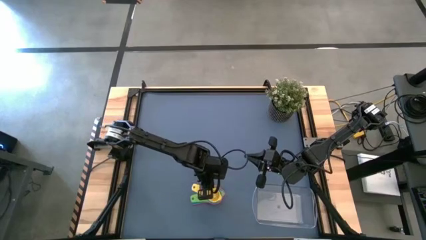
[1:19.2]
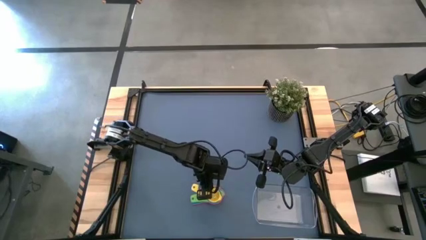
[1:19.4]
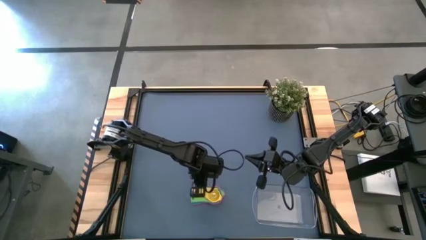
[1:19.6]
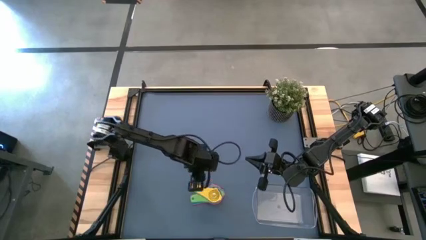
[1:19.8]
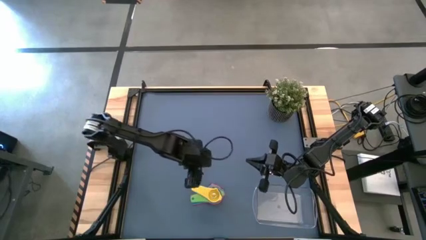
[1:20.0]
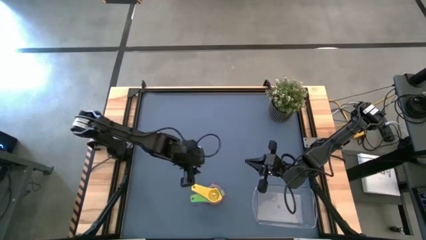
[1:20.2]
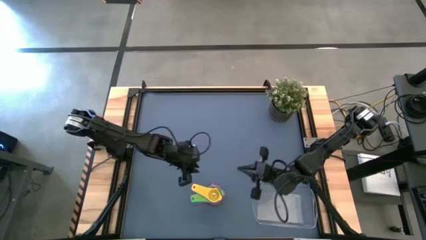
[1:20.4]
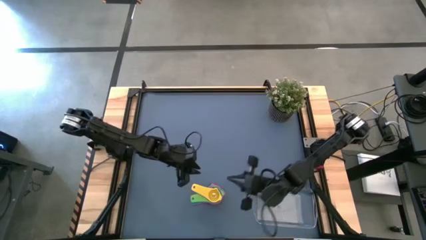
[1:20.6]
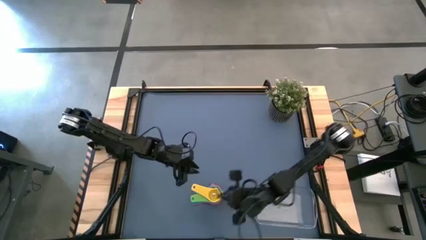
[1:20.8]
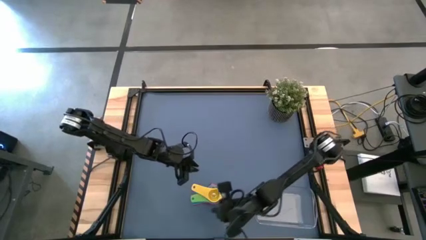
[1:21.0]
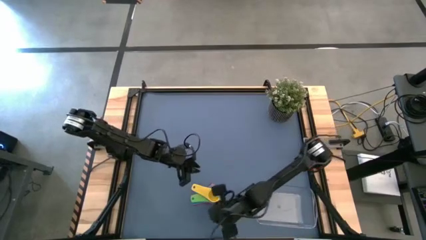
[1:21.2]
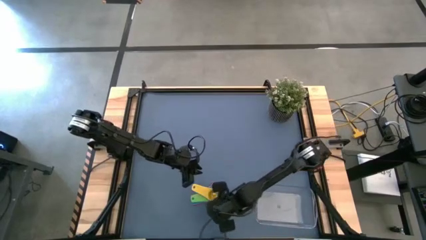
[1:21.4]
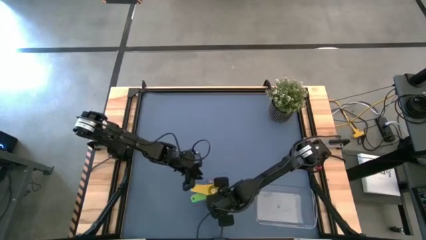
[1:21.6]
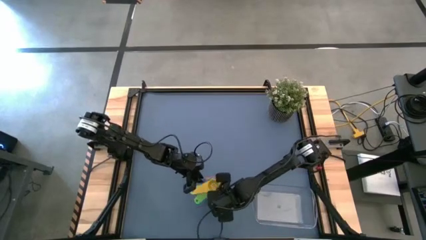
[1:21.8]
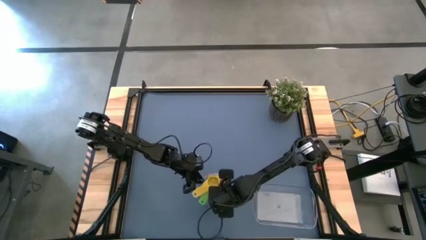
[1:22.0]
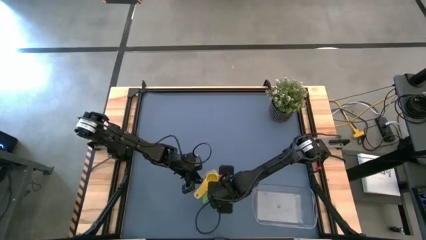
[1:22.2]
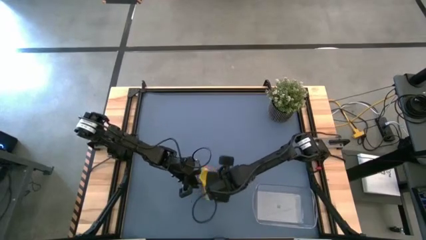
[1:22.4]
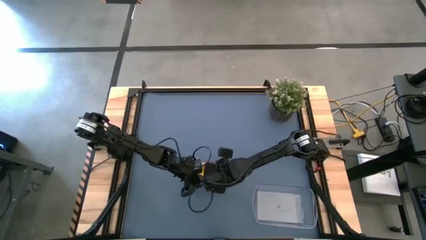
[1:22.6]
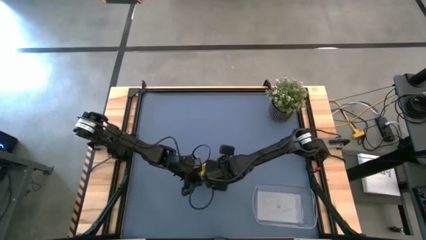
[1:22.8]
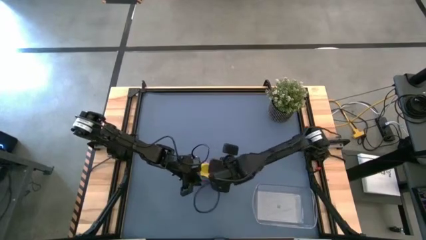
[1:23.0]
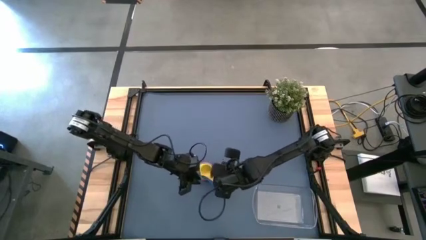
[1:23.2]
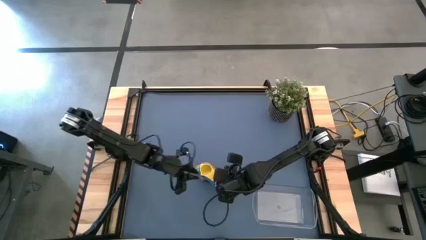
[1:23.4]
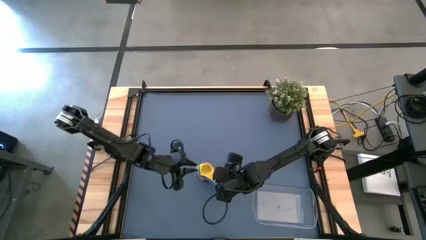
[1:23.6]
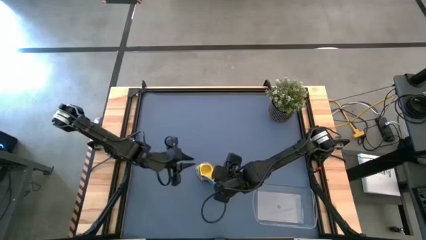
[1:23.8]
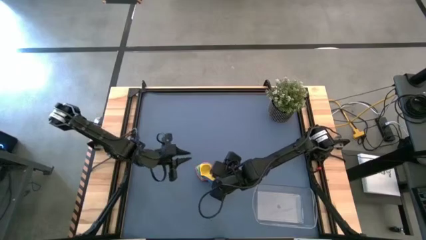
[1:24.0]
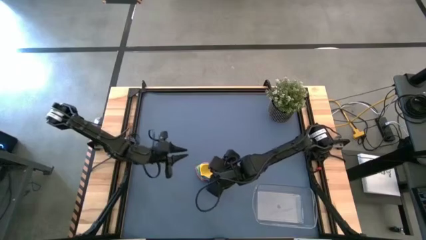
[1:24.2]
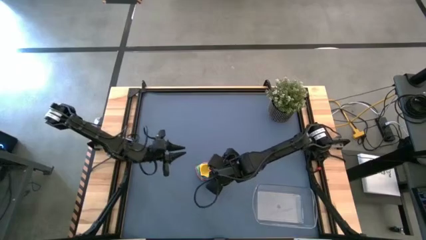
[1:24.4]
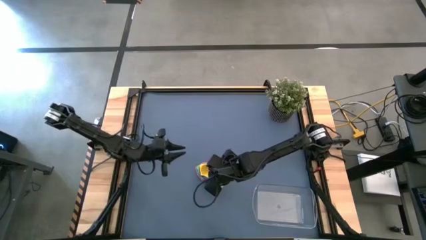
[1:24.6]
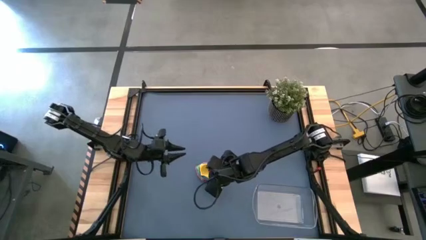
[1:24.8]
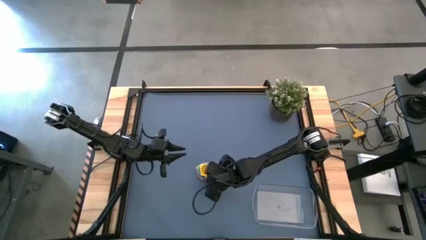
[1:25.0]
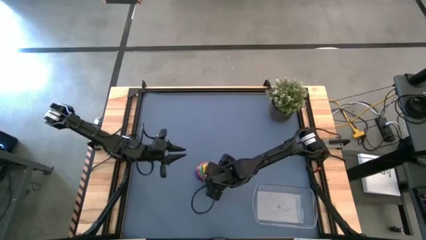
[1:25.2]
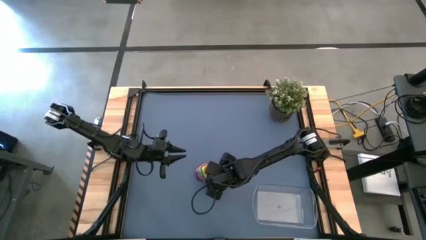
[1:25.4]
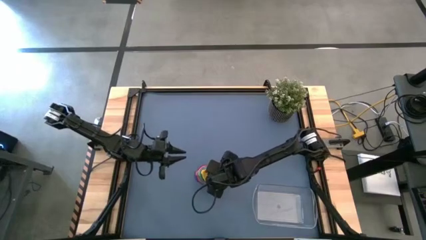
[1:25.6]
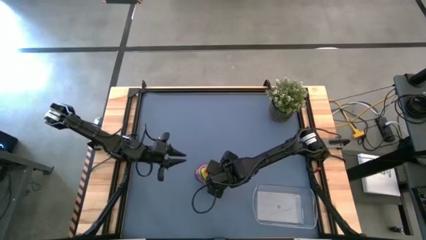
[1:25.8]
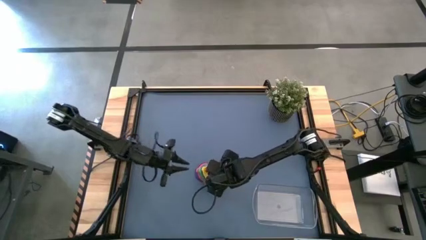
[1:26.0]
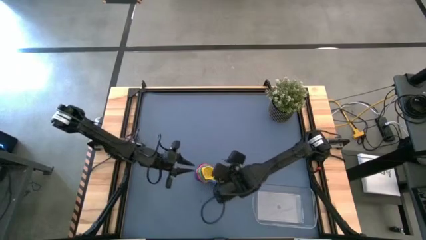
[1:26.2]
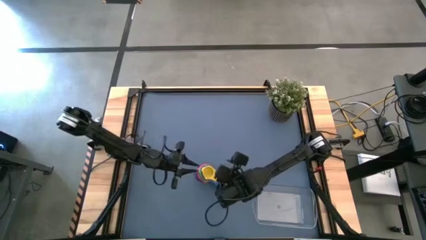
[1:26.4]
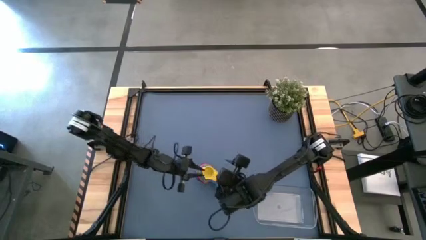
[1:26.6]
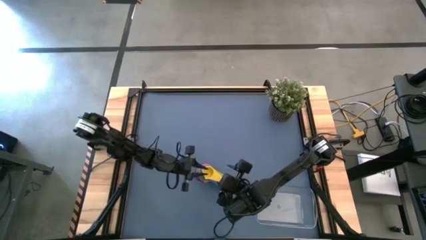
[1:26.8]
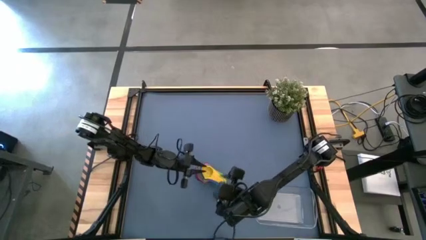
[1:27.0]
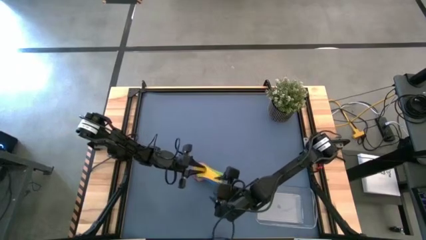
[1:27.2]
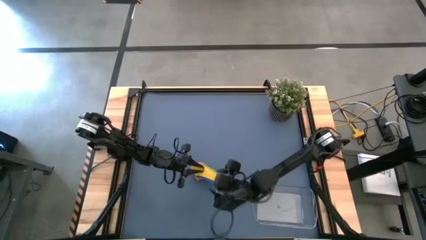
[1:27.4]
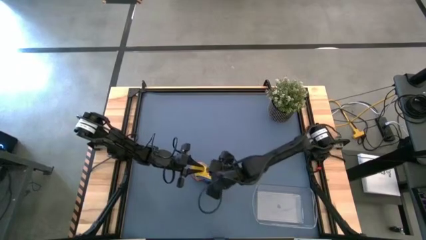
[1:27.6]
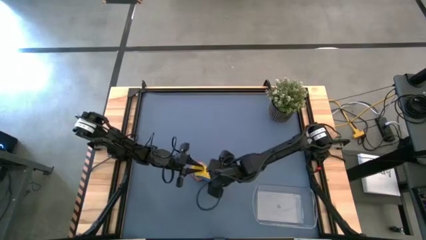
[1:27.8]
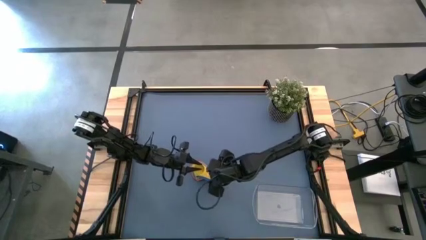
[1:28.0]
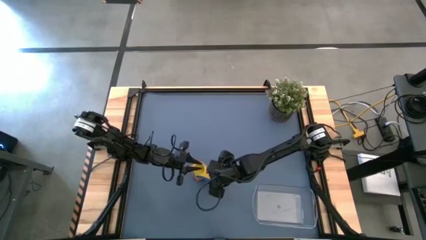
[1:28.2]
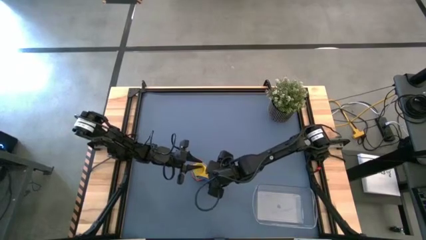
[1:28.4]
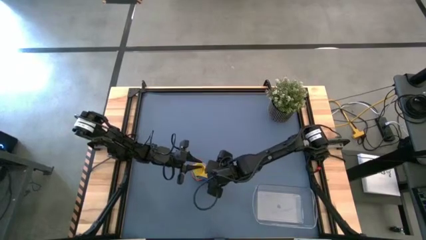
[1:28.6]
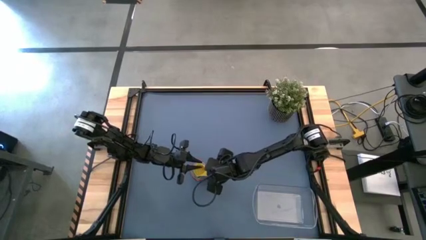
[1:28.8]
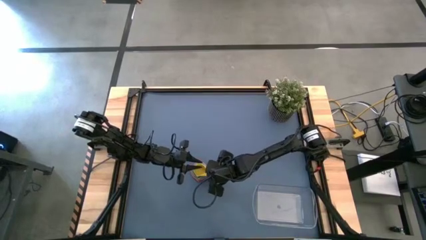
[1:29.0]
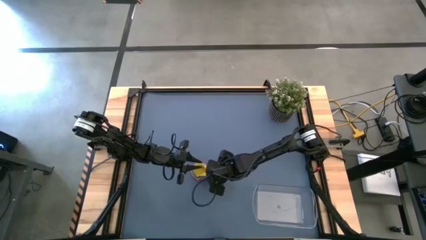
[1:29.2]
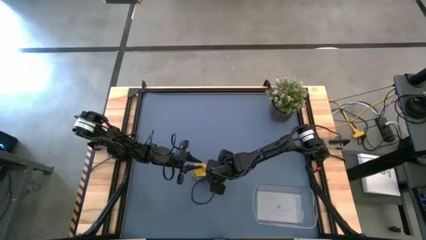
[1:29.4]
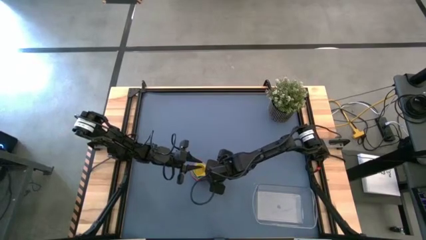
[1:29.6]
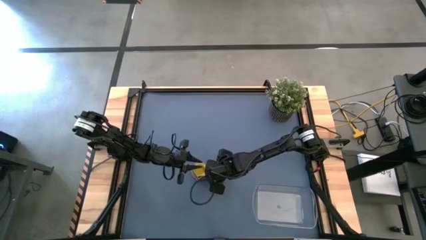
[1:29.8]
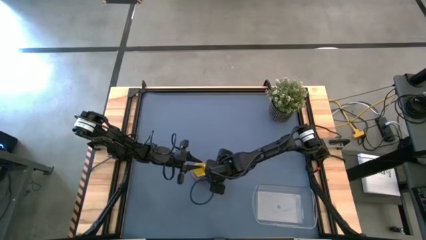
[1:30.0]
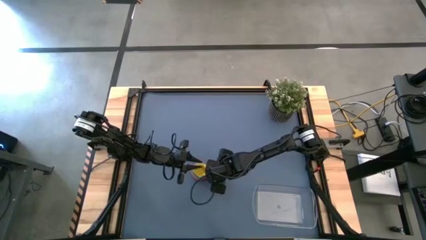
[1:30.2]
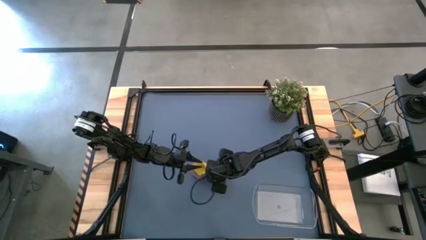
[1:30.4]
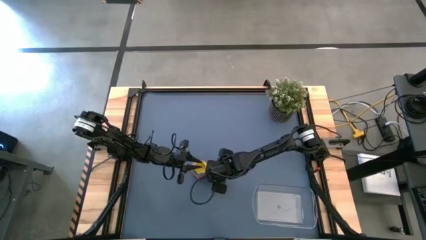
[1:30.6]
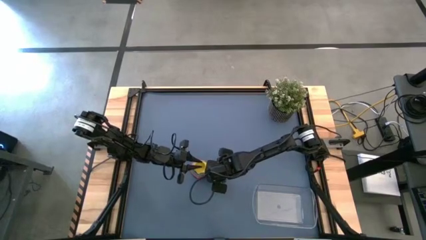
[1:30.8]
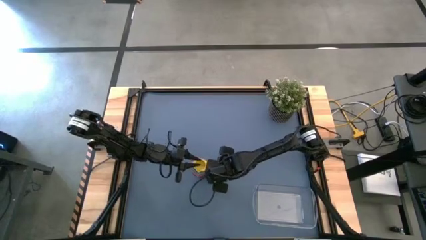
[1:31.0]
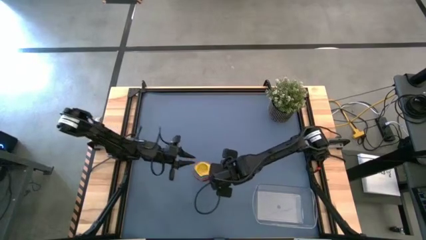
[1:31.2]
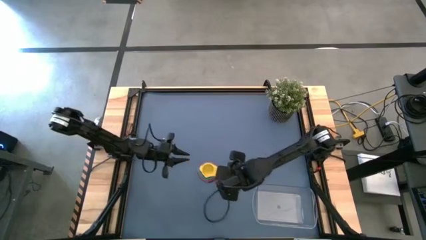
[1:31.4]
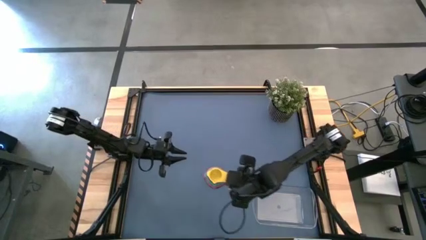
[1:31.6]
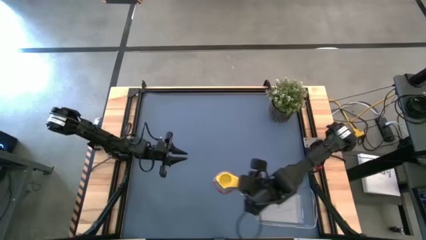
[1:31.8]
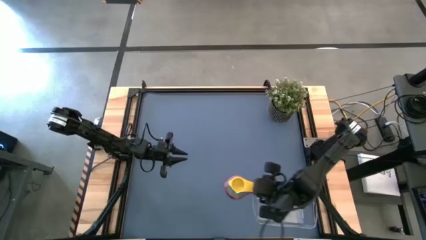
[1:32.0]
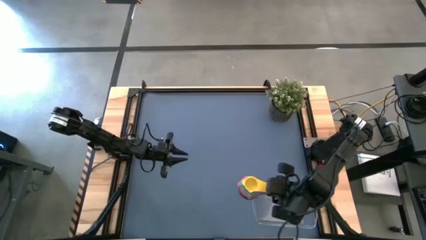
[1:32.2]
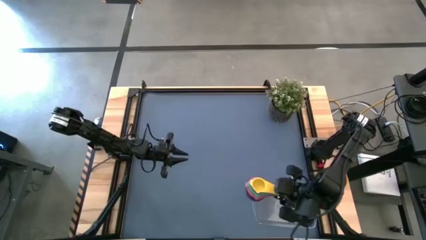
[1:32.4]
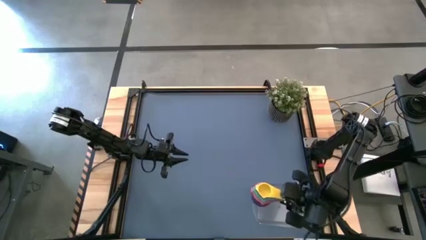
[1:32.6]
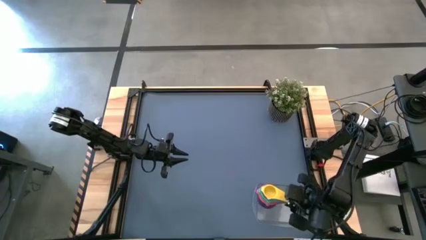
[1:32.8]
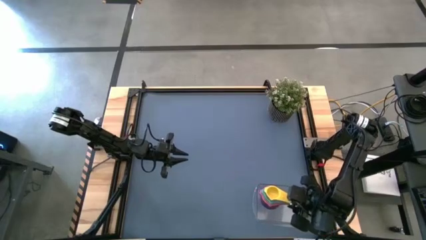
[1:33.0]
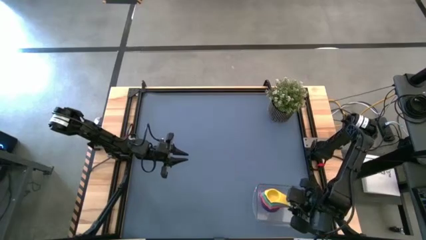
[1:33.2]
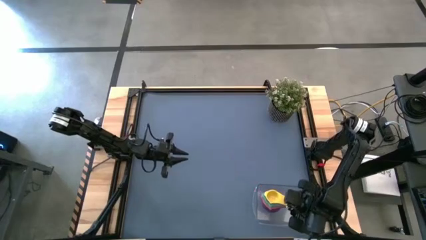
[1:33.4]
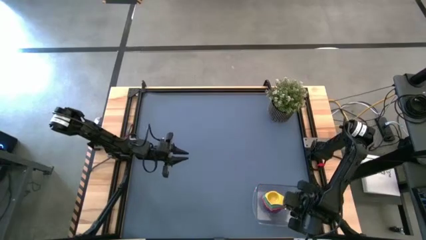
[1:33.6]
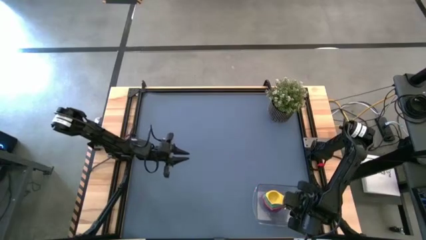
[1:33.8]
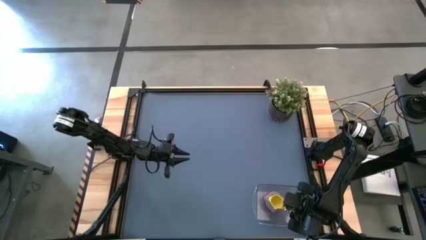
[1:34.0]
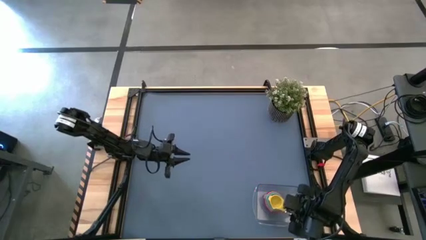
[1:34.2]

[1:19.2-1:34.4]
Task: Nest measuring cups in basket
Put the stacked measuring cups into the transparent bin
